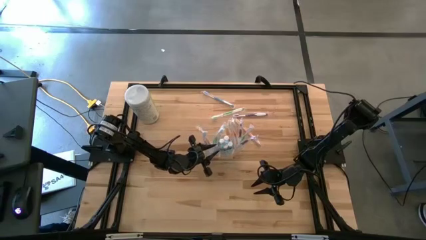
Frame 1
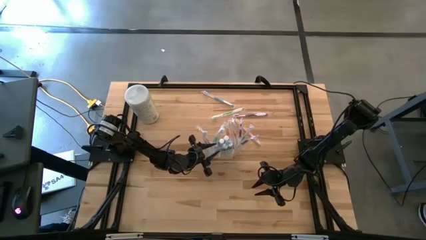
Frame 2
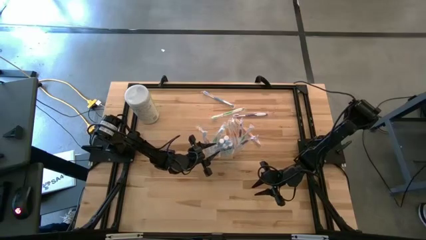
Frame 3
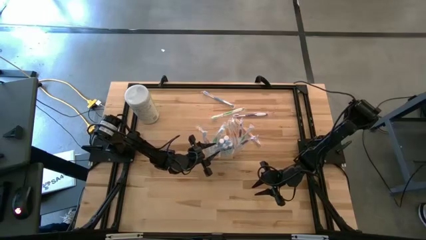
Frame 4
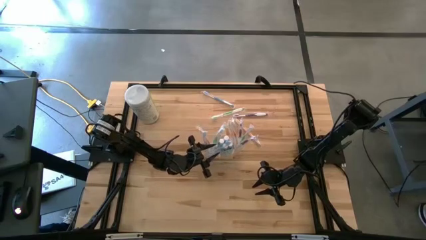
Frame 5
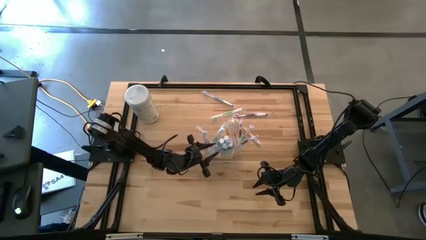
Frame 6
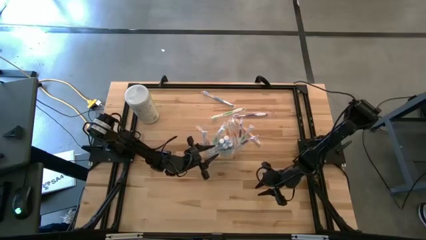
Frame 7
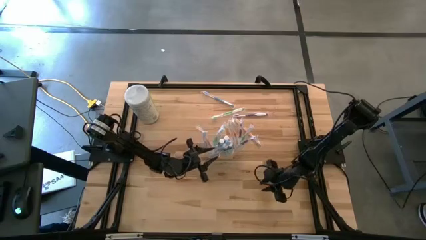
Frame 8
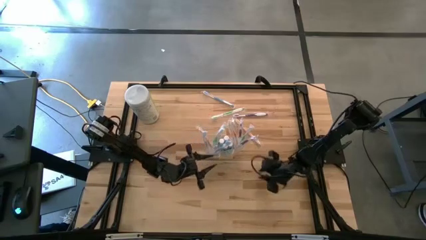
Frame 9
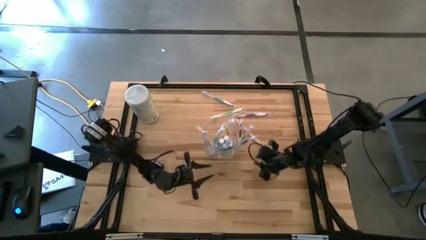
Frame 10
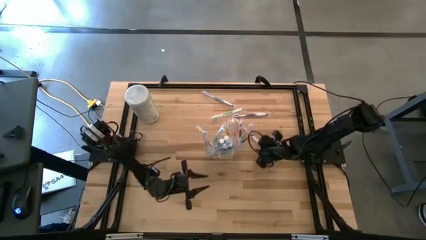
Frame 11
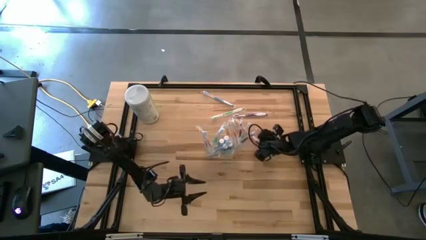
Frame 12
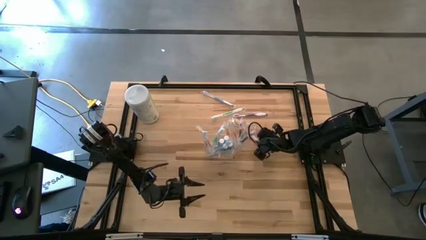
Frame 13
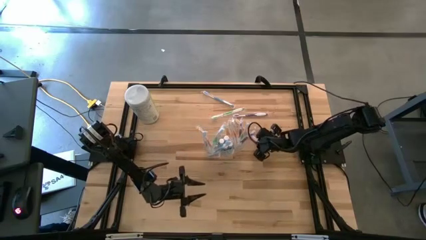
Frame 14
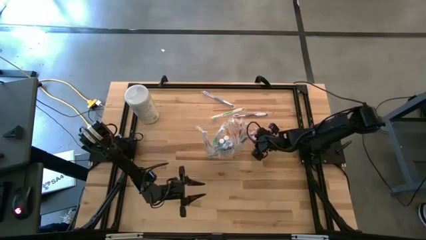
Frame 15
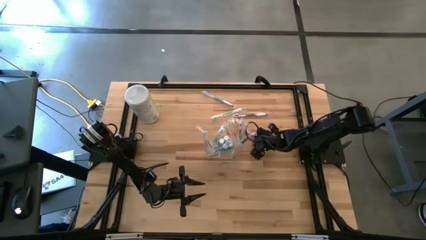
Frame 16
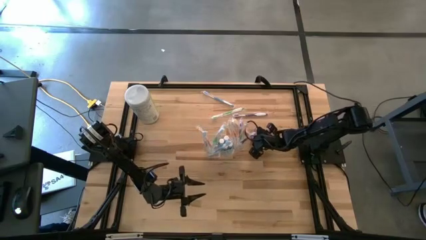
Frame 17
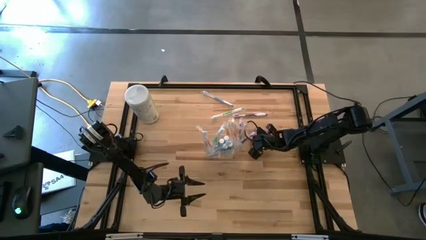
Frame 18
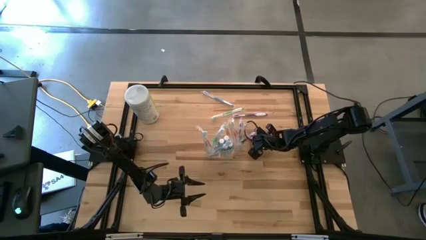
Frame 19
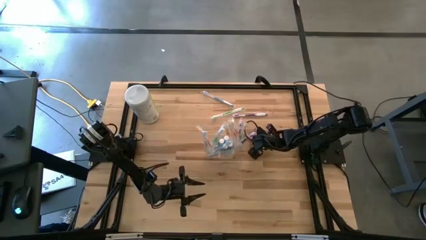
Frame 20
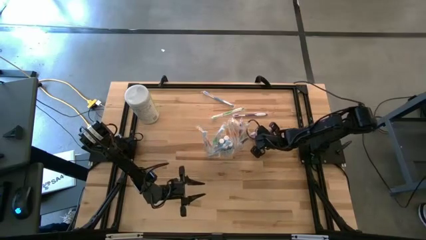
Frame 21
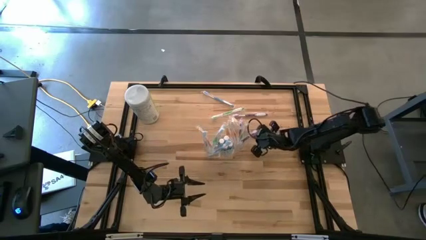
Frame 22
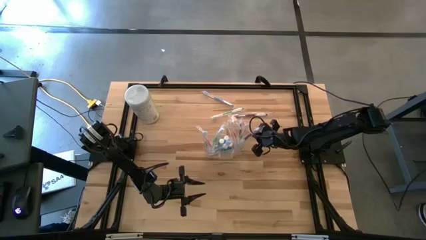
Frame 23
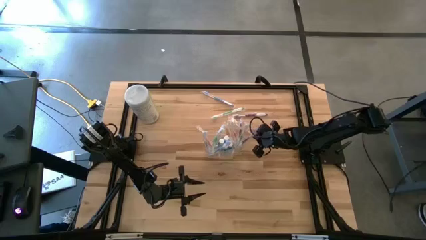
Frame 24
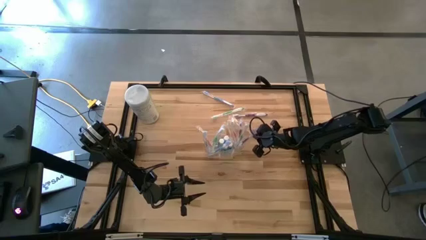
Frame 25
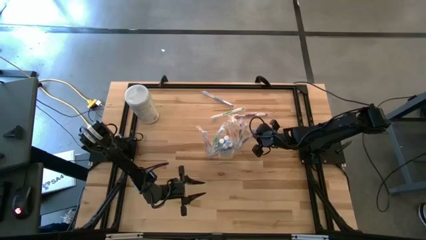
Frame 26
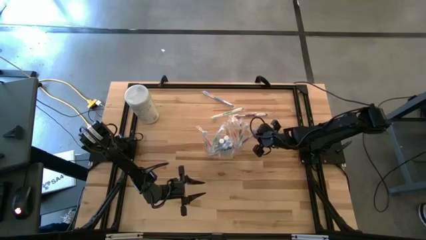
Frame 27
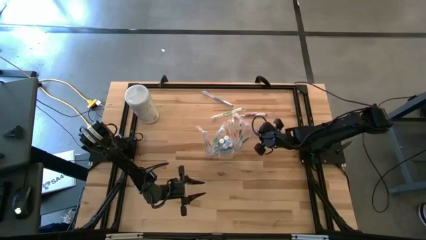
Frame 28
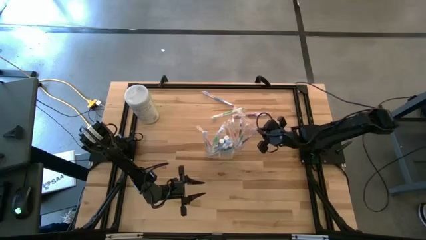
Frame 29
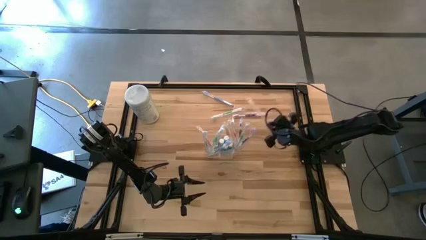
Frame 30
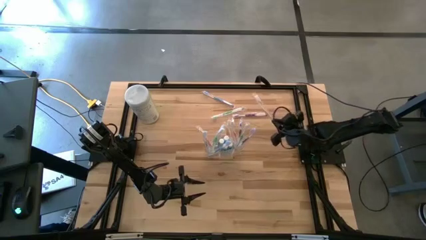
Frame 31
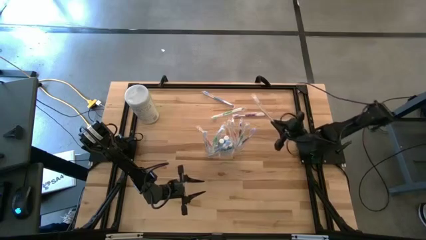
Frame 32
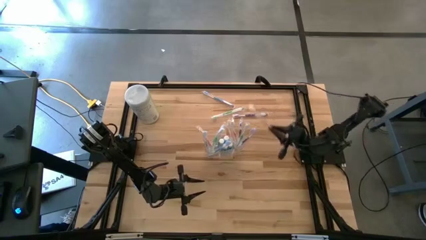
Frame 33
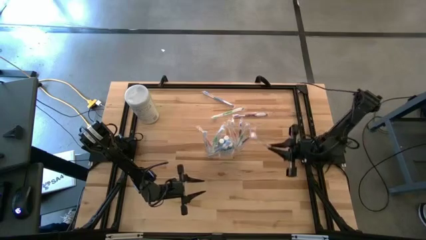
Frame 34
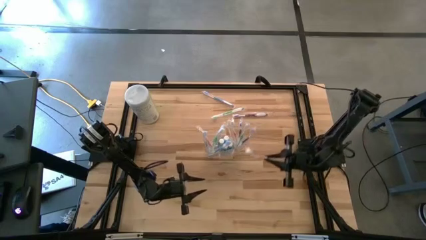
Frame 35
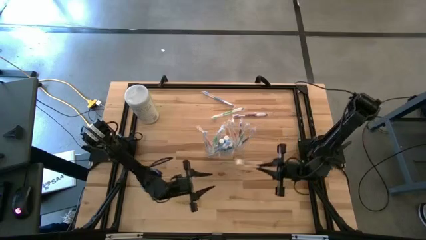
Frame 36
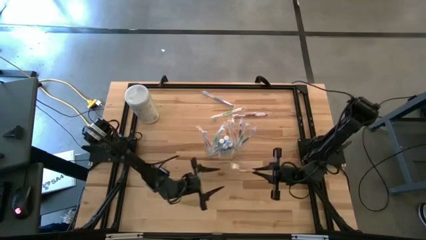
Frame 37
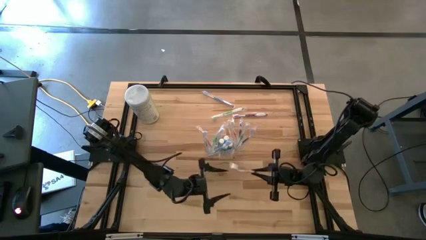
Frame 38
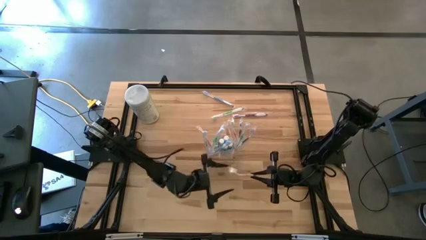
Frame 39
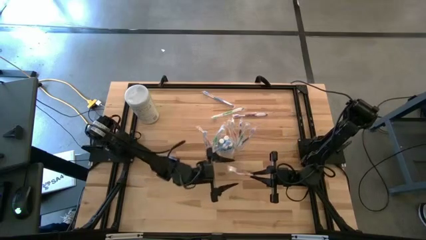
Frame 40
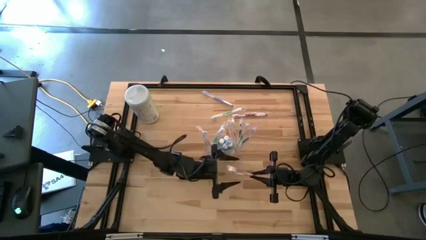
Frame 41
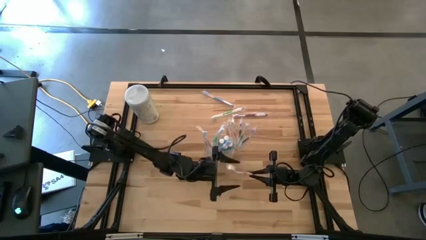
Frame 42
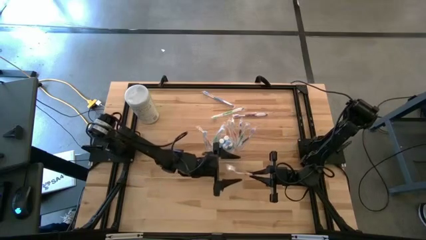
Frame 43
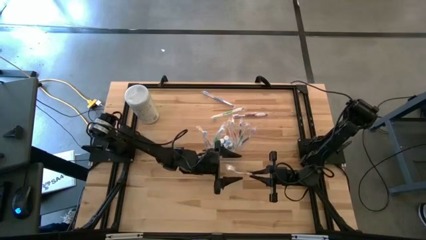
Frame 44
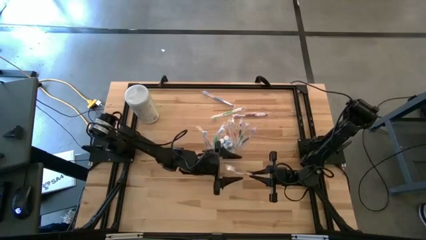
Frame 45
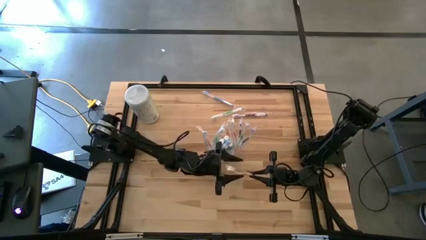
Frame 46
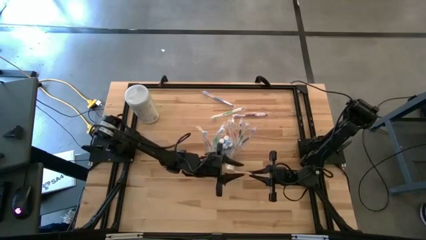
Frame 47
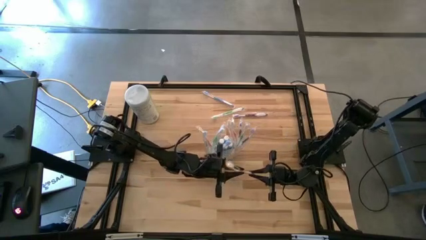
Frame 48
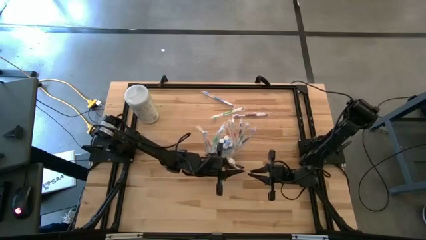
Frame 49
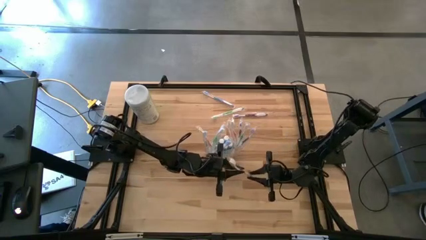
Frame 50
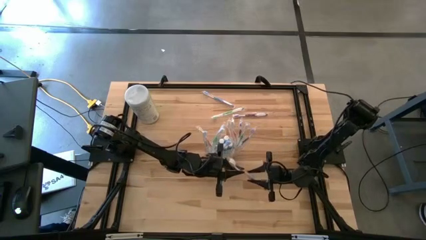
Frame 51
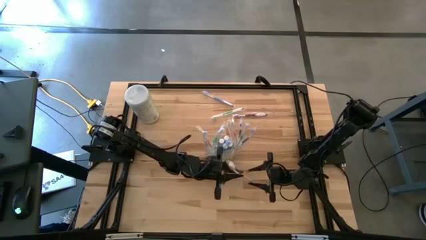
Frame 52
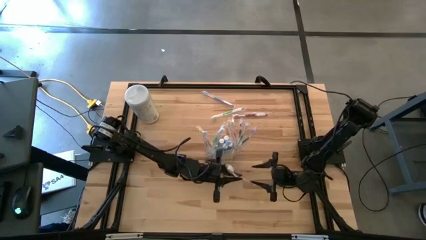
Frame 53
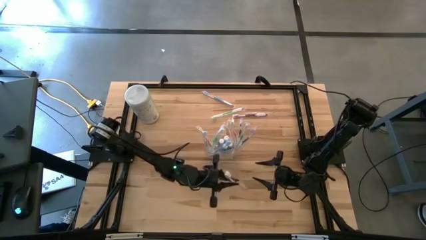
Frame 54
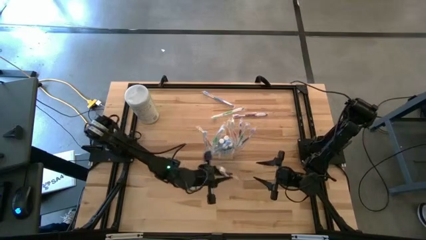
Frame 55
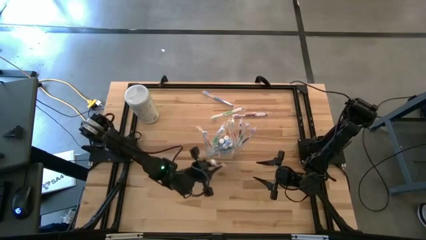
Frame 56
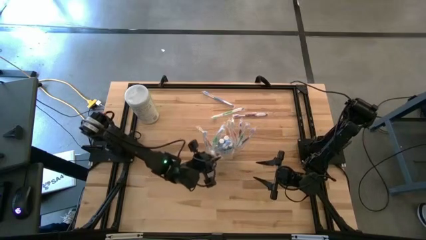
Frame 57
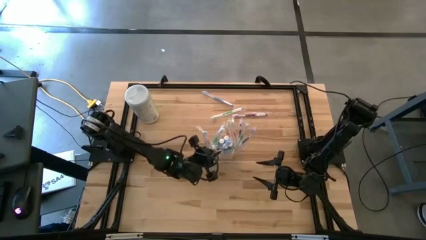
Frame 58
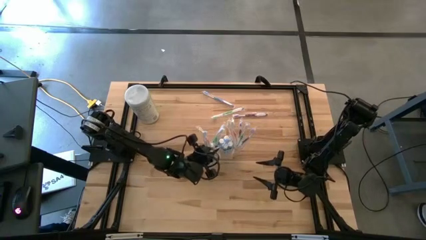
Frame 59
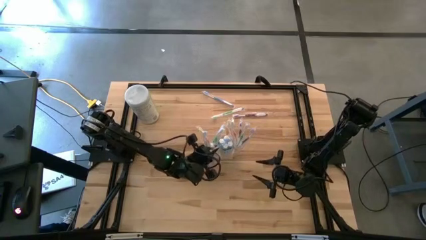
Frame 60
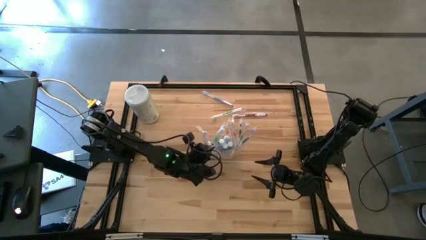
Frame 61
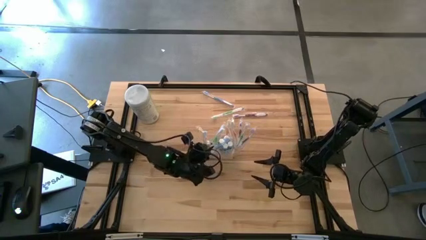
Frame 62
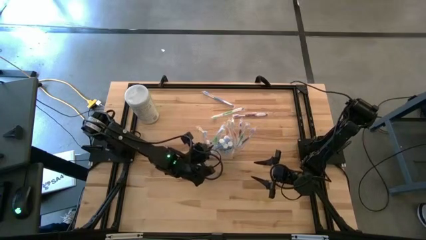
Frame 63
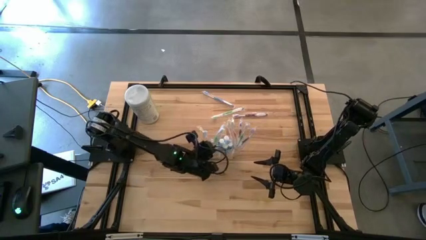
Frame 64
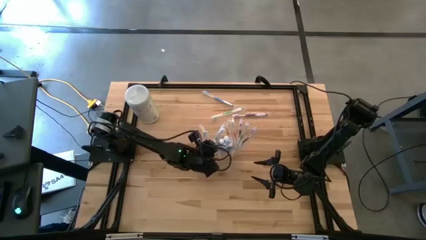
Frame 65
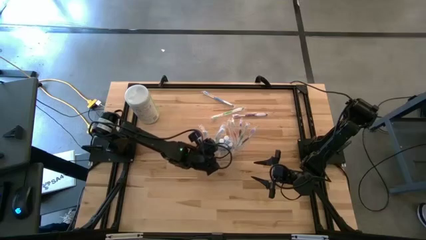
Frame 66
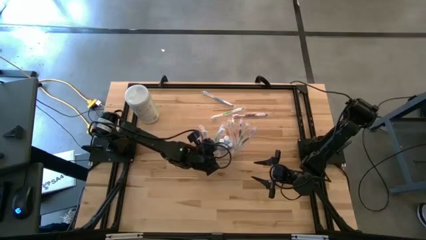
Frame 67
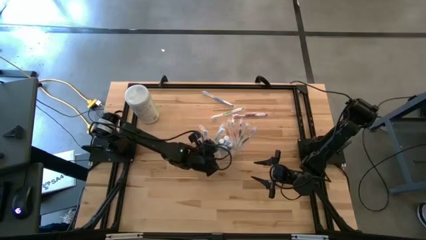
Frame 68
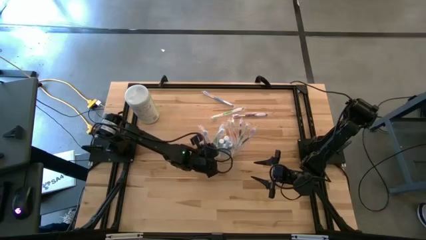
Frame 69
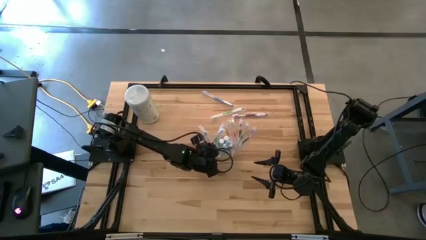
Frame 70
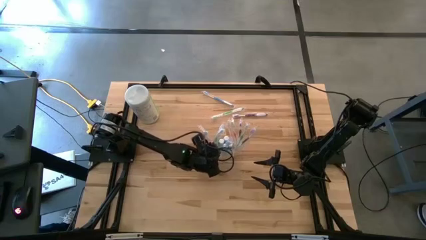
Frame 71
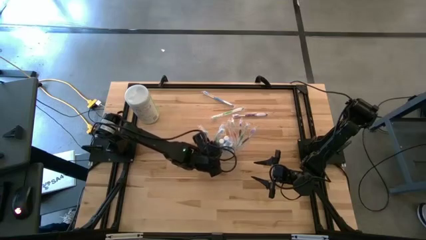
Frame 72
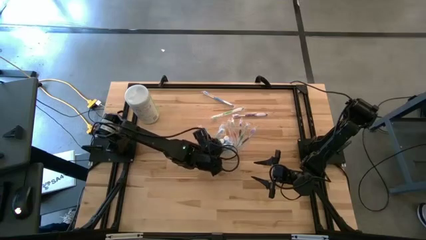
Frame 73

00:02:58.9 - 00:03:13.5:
Task: Pick & Place toothbrushing station
Put the orange toothbrush into the transparent organizer

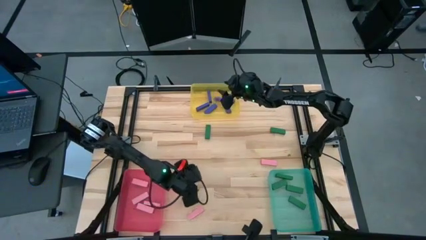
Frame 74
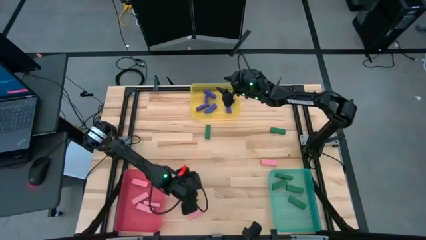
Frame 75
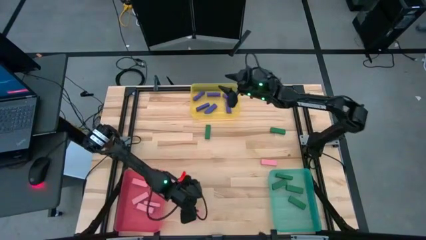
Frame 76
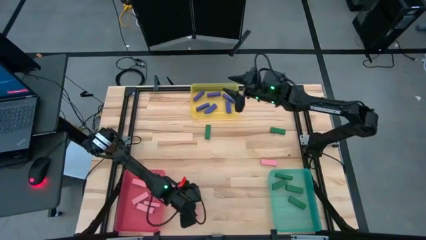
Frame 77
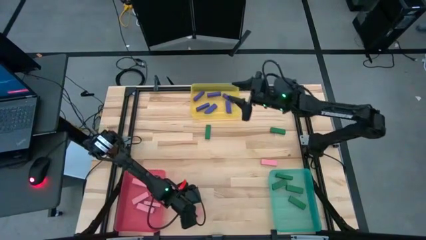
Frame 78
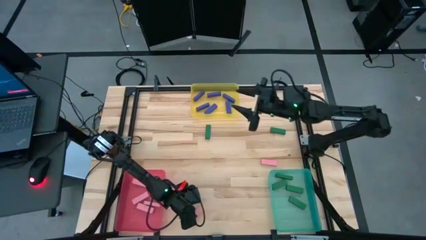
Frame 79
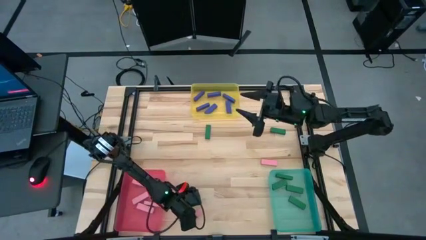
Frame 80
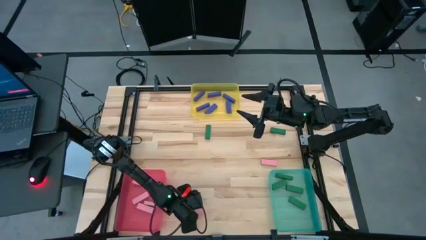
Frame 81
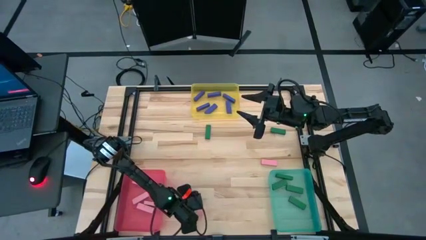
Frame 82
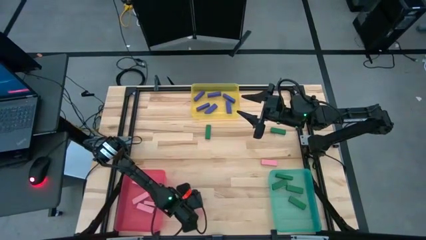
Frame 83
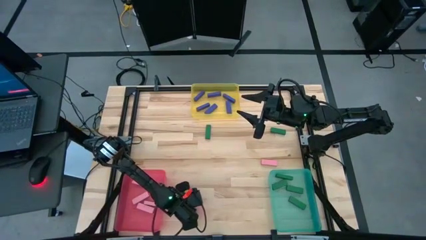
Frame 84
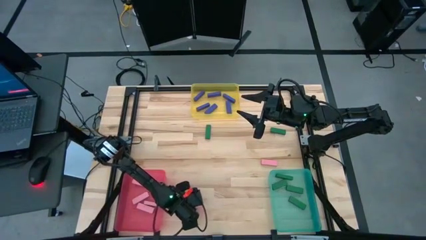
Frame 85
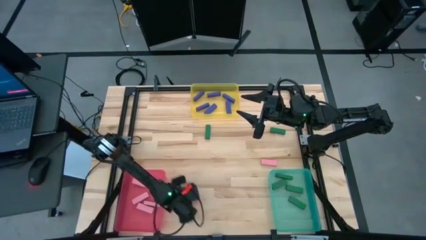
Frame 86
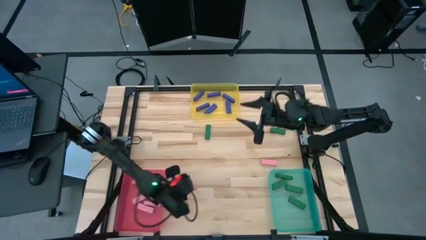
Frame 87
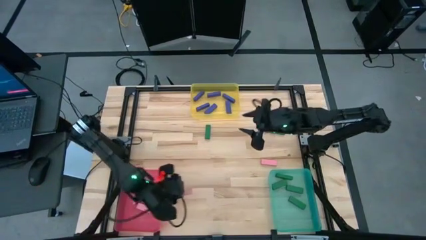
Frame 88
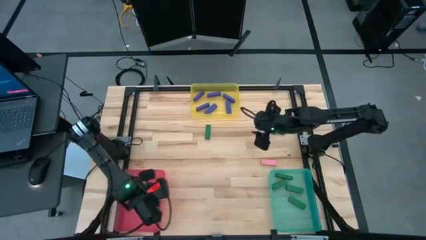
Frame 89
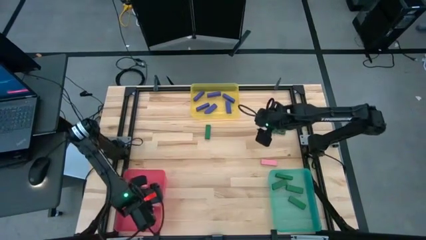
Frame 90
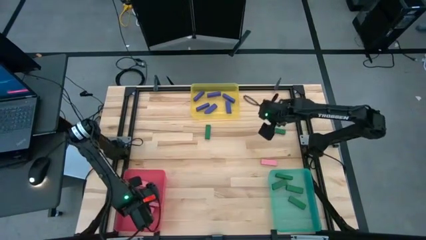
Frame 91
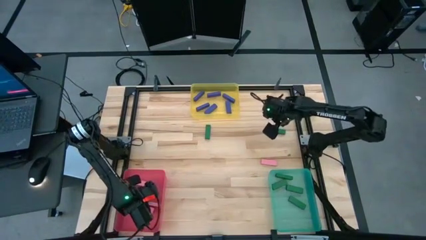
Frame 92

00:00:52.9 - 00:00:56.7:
Task: Sort blocks
Put the pink block into the red bin
